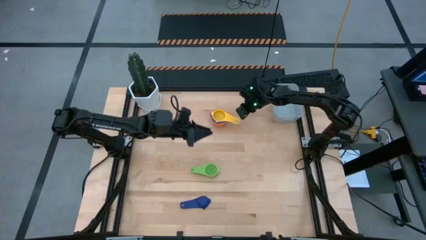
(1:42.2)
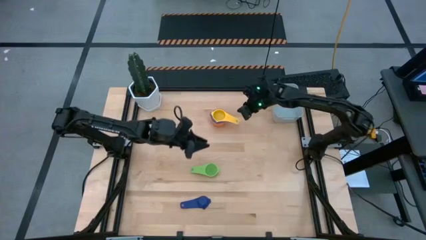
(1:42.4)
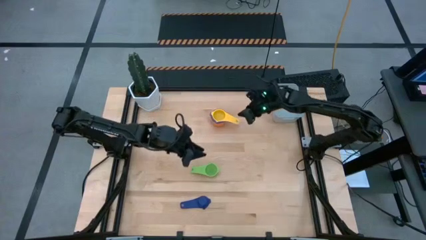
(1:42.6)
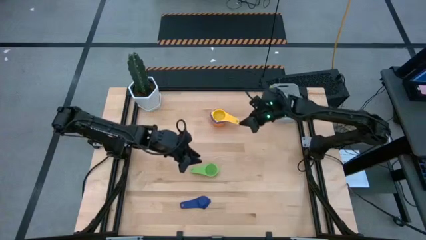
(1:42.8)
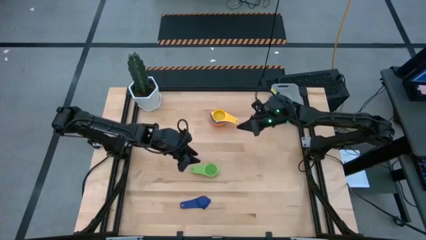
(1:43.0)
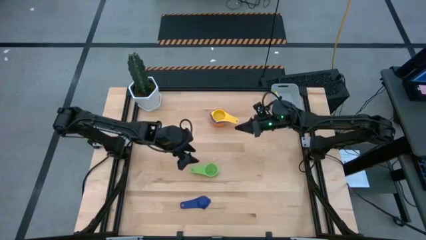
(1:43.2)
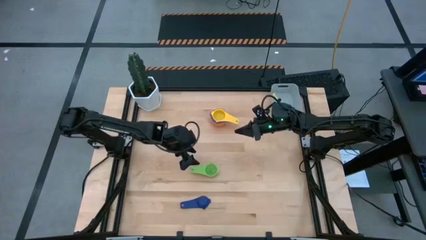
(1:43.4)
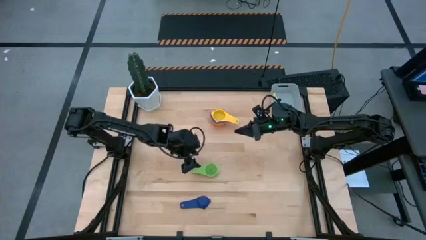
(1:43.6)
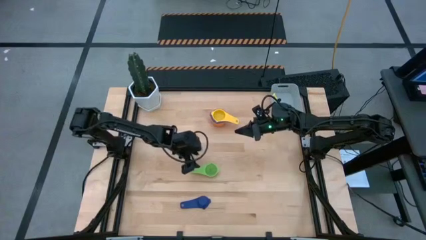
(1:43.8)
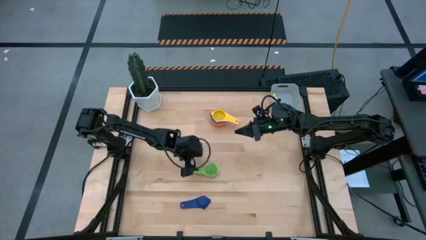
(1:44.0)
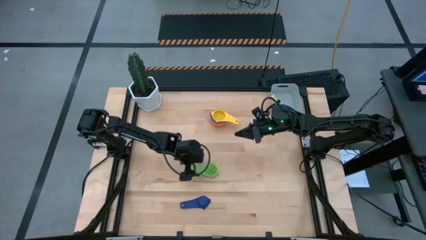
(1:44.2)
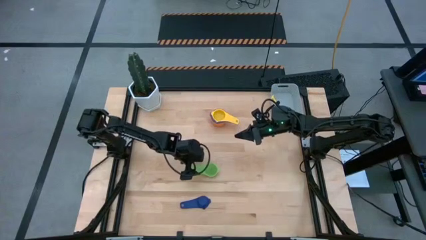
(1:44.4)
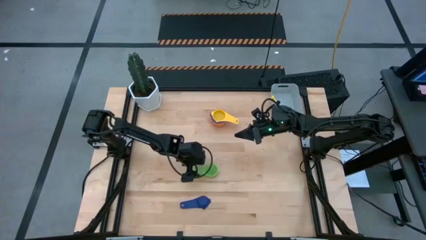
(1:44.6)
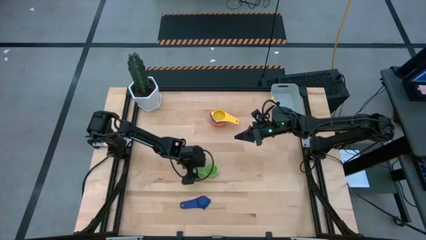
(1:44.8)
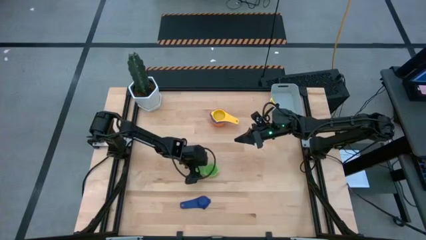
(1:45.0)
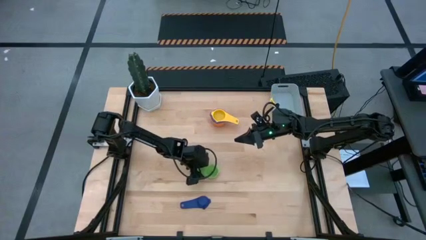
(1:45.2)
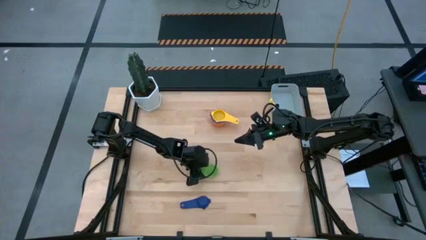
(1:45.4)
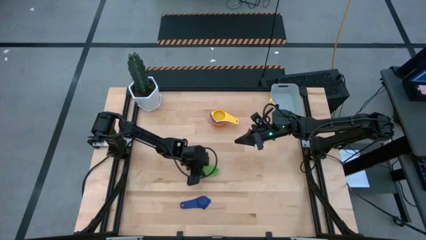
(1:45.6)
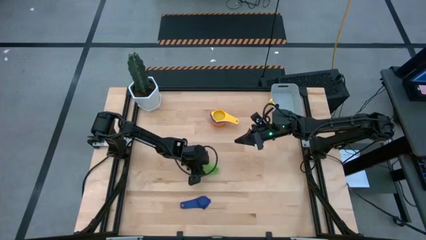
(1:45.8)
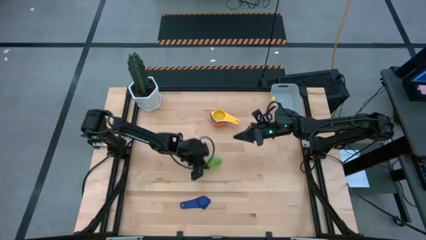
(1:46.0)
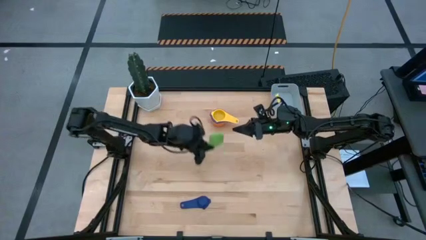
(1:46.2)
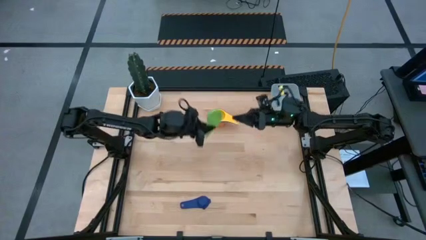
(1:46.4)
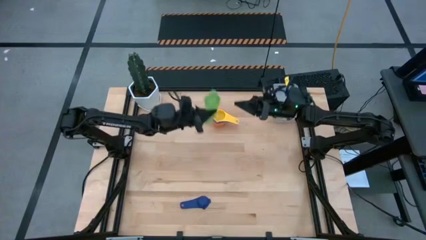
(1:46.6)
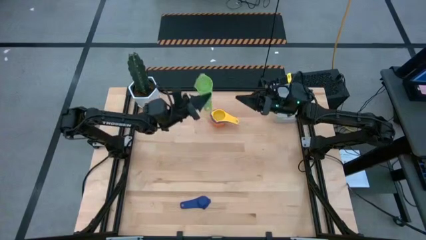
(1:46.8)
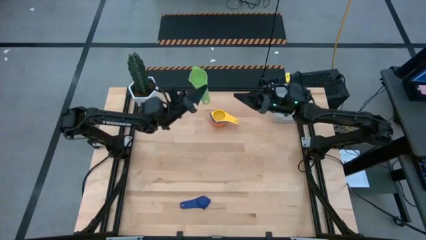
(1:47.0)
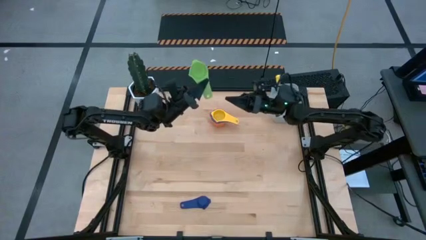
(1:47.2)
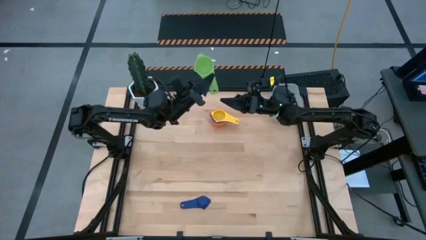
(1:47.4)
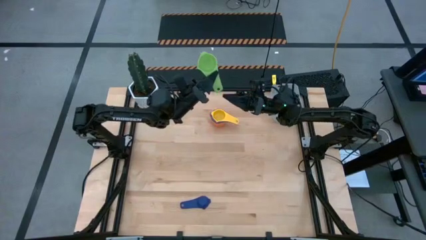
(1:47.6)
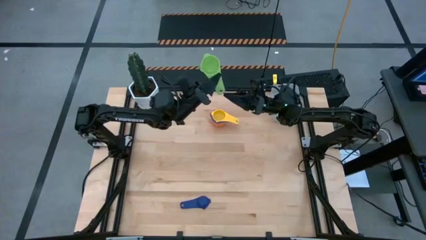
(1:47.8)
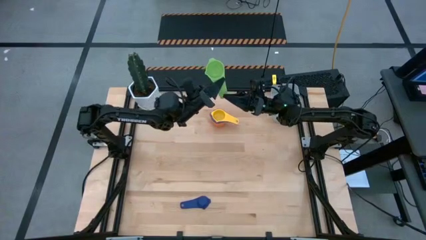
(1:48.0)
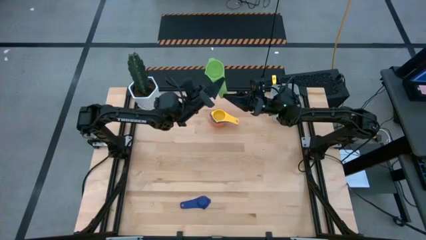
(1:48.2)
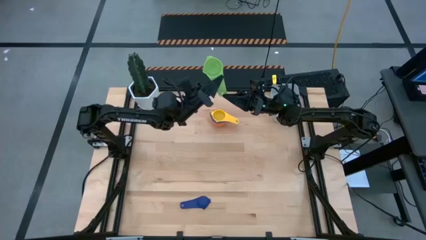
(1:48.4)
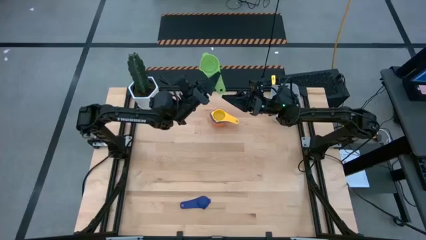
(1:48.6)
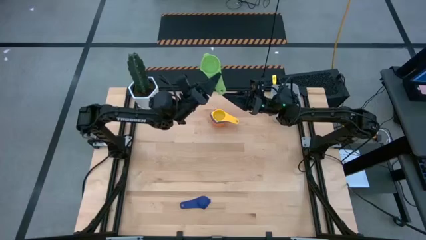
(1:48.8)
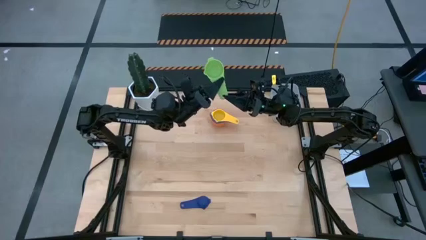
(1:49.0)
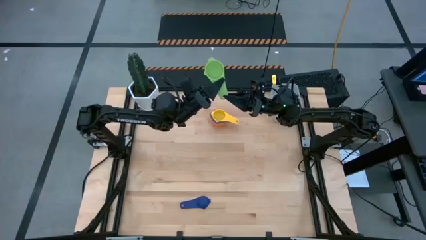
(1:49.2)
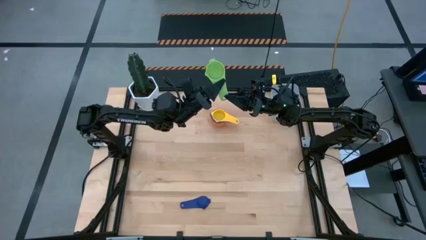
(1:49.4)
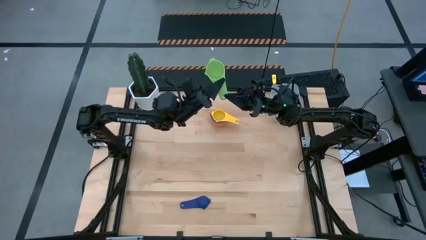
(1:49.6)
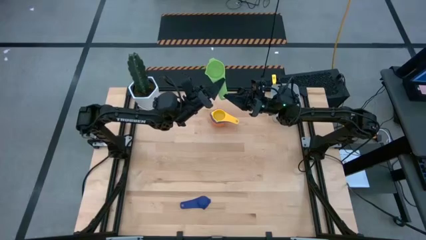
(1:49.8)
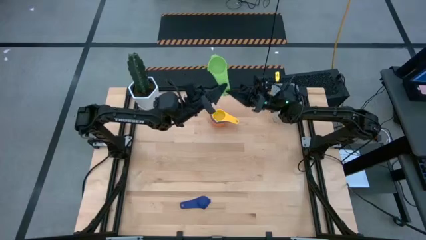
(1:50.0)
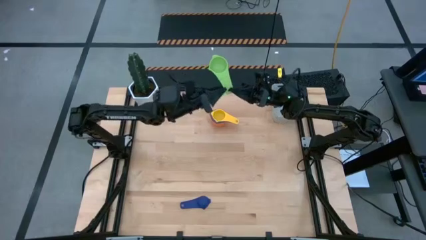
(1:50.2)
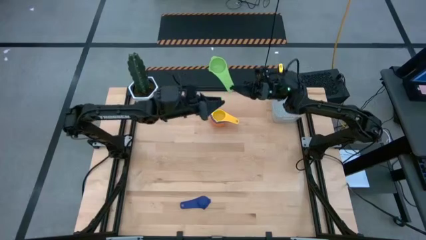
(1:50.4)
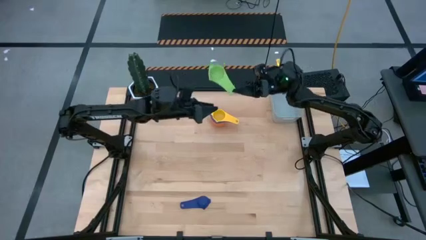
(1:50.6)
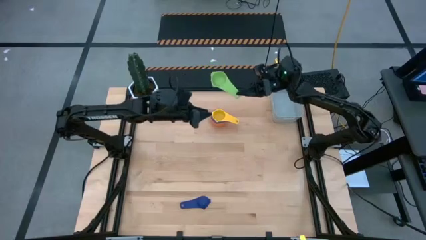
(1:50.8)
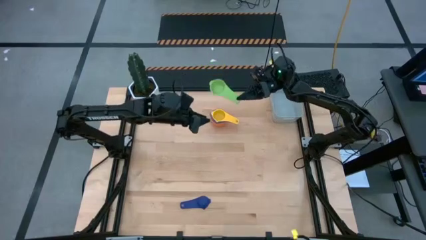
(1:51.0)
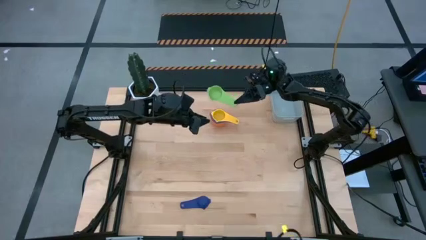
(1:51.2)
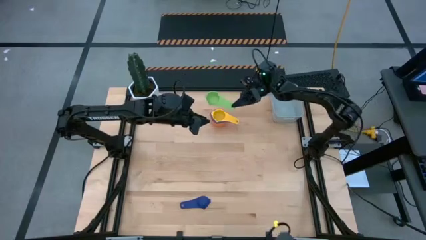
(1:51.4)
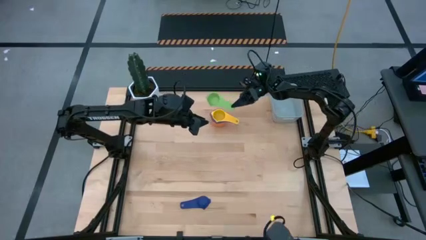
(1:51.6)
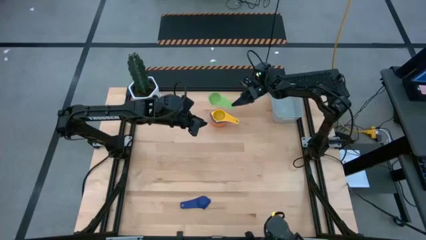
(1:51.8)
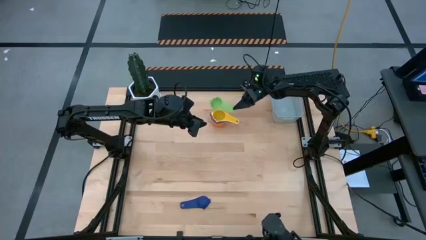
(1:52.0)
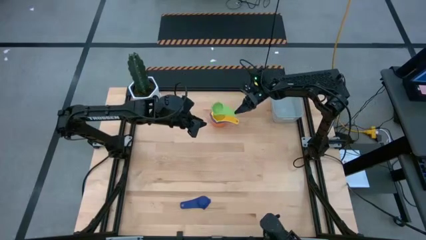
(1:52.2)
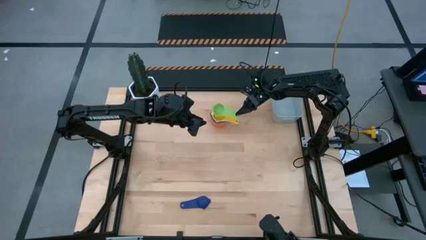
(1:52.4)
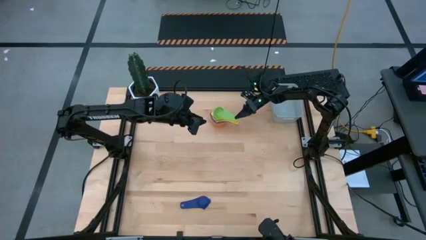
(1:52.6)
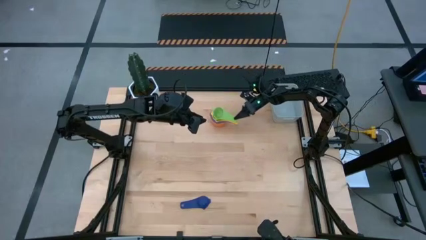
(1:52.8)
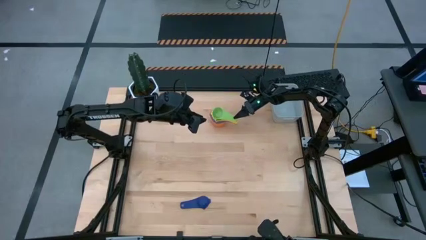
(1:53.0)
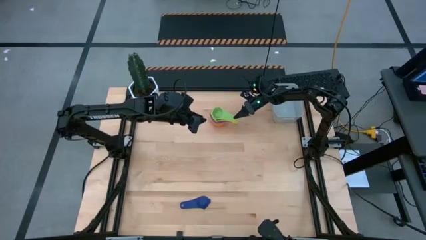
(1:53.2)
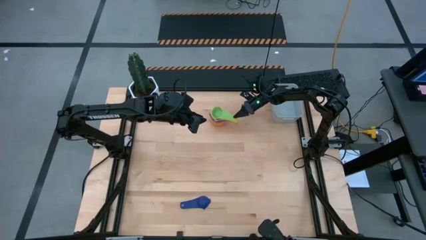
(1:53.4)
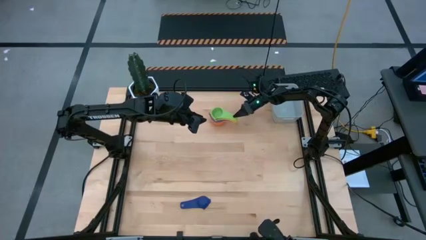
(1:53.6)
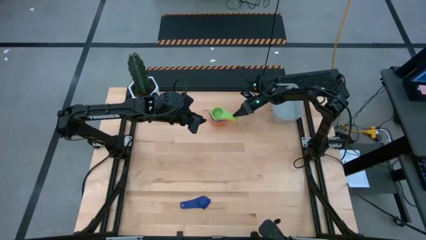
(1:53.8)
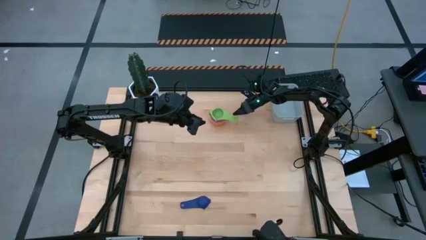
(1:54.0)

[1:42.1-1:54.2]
Task: Nest measuring cups in basket
Stack the green measuring cup on top of the yellow measuring cup

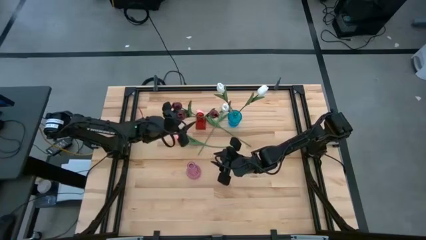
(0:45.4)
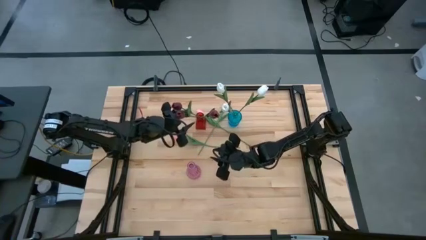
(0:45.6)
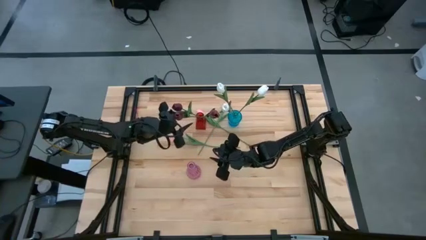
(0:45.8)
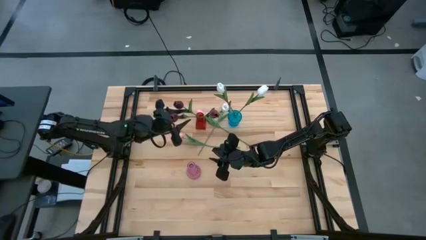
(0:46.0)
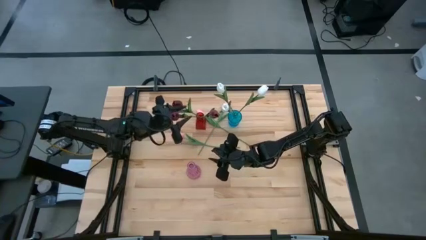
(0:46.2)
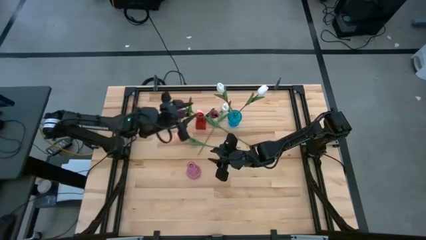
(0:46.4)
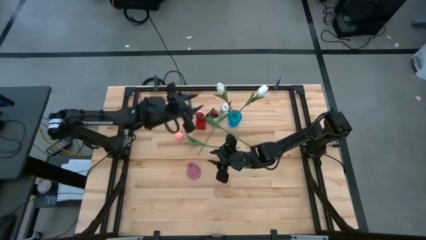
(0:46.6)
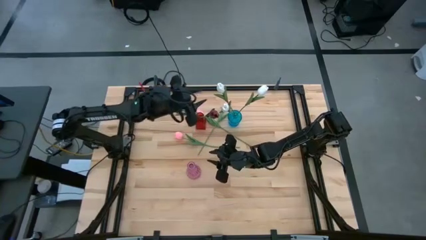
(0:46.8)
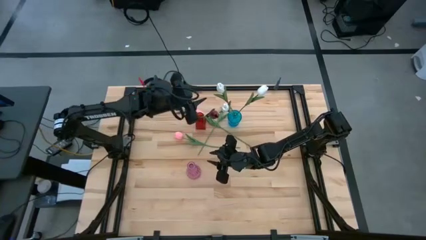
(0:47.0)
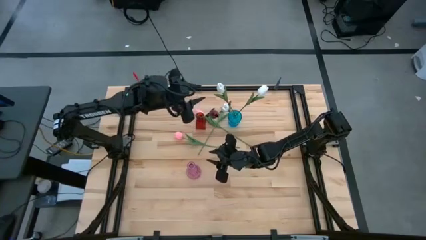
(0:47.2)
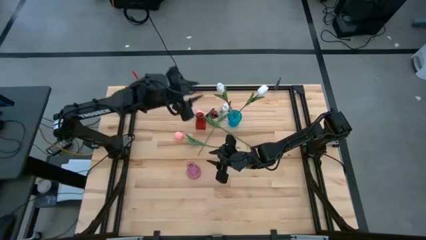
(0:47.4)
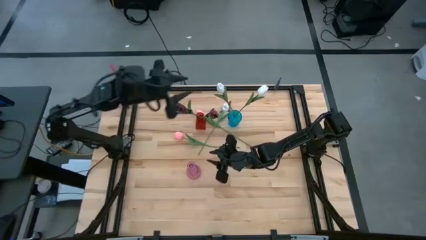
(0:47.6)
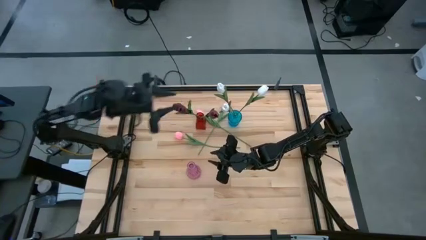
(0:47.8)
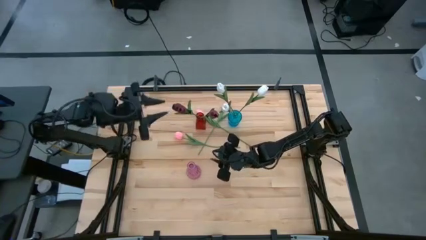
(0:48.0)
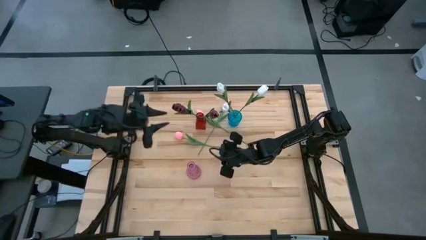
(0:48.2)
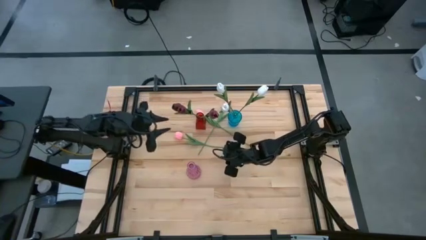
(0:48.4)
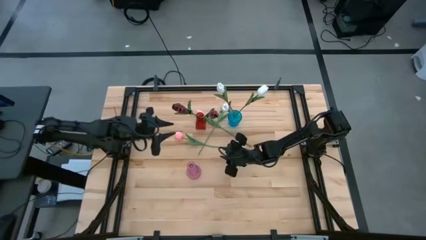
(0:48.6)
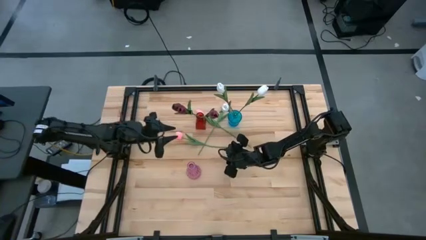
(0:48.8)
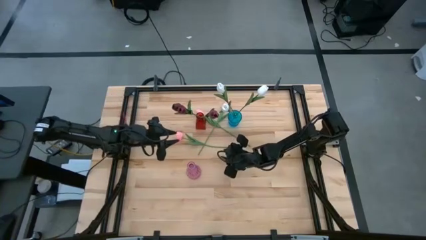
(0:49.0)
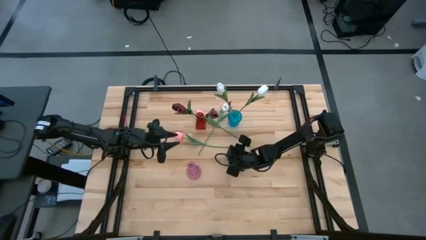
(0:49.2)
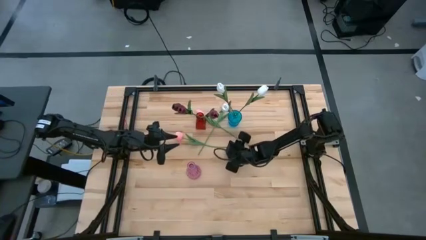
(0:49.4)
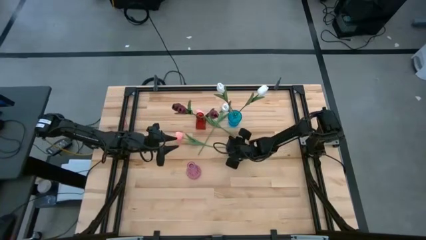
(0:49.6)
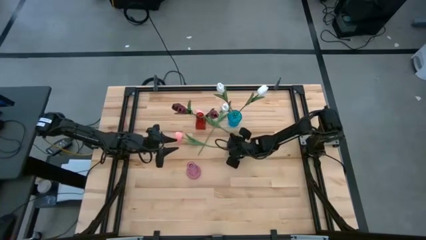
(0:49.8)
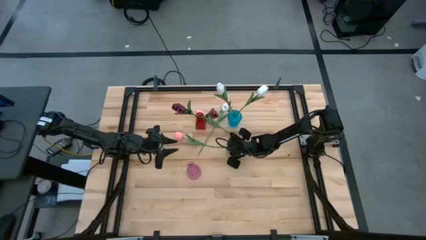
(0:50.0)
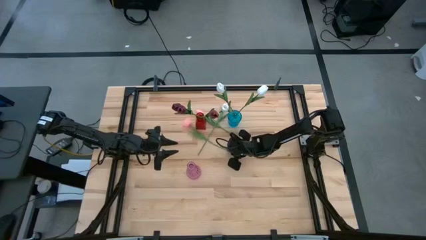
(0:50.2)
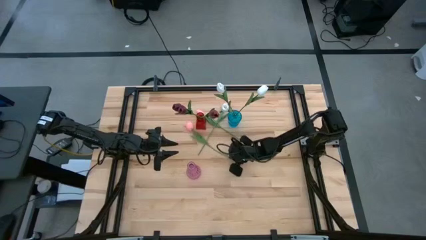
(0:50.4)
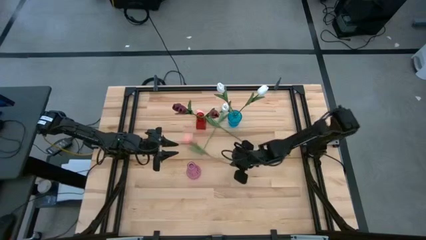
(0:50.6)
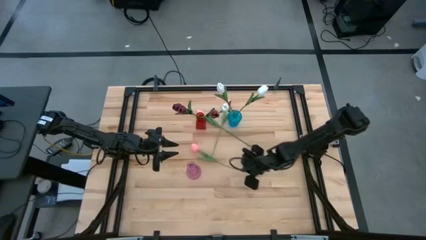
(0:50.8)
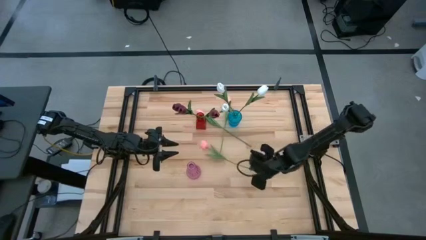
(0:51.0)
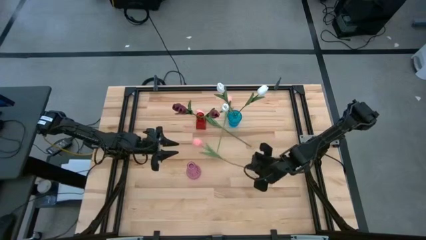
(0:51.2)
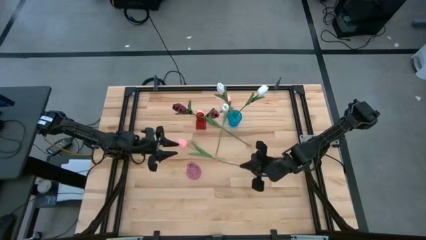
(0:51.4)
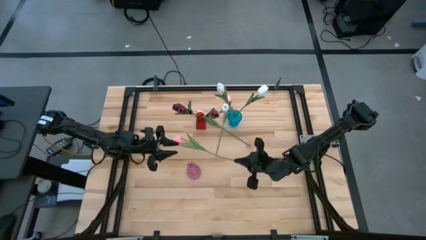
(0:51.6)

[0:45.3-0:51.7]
Task: Sort flowers into vase by color
Put the left pink flower into the pink vase
